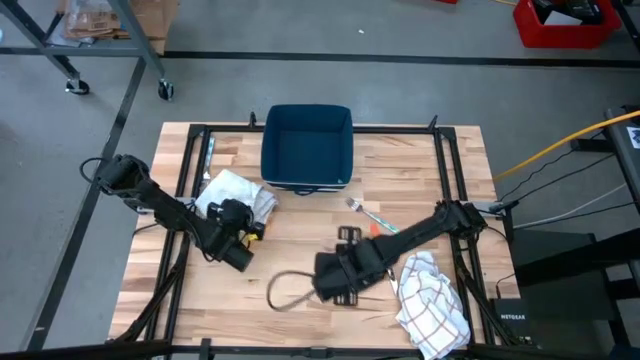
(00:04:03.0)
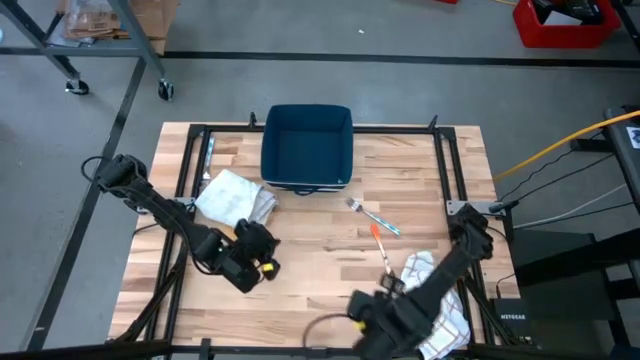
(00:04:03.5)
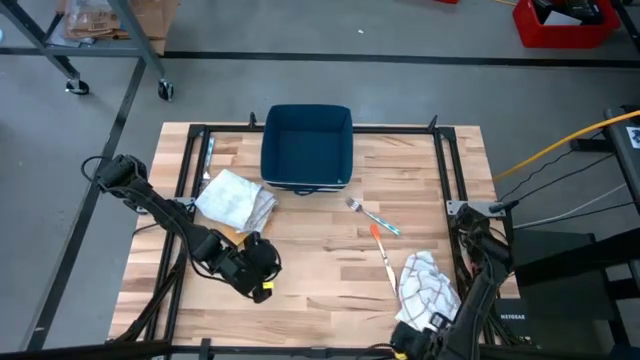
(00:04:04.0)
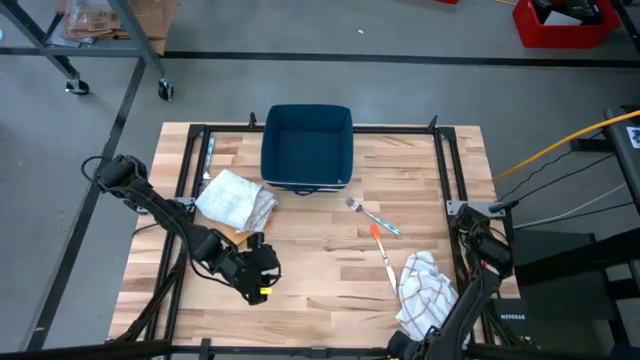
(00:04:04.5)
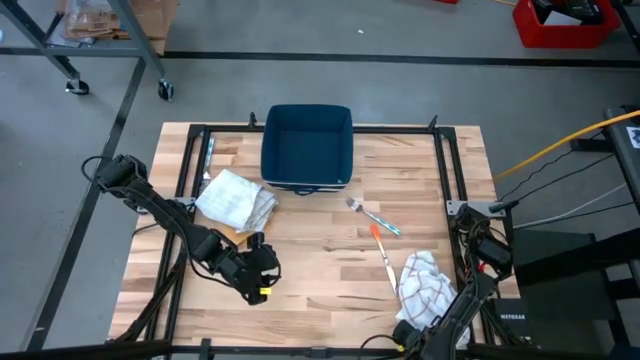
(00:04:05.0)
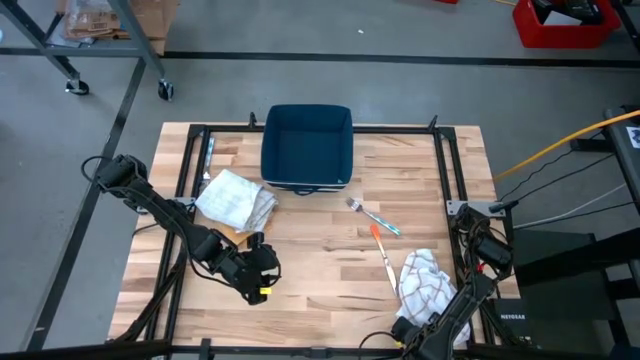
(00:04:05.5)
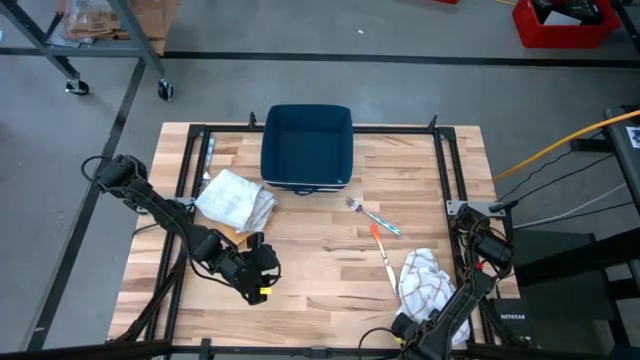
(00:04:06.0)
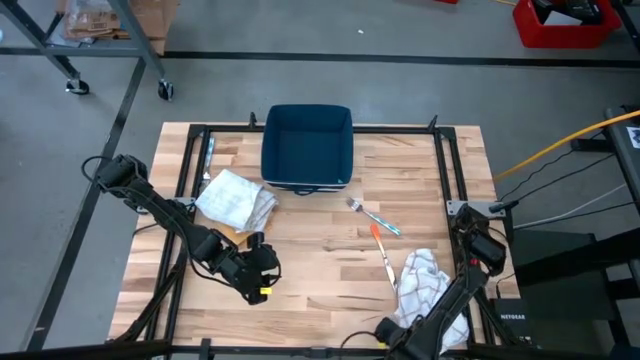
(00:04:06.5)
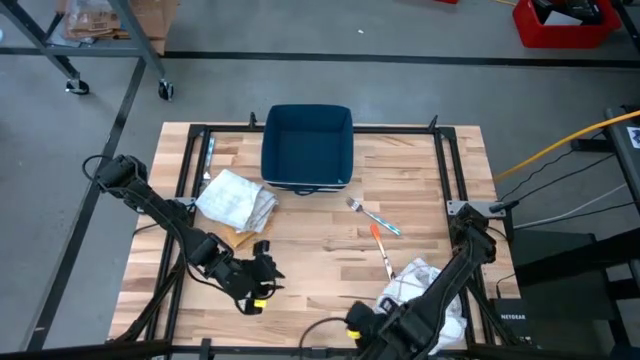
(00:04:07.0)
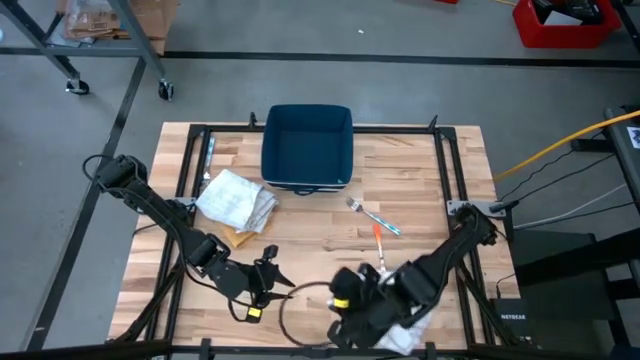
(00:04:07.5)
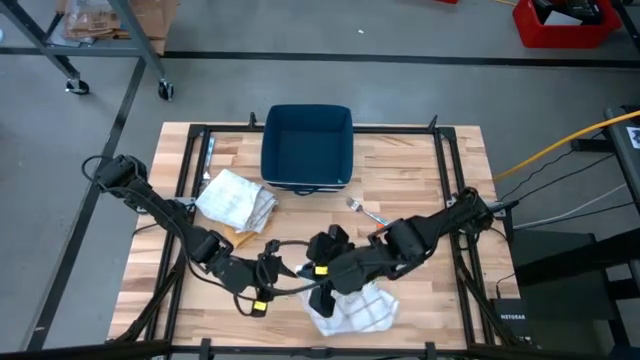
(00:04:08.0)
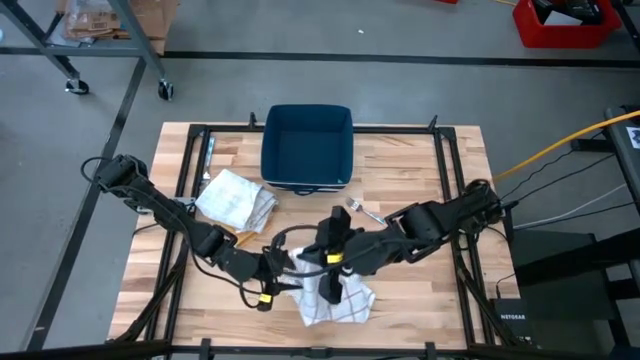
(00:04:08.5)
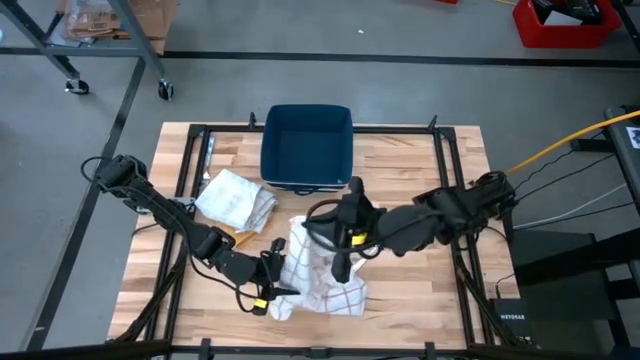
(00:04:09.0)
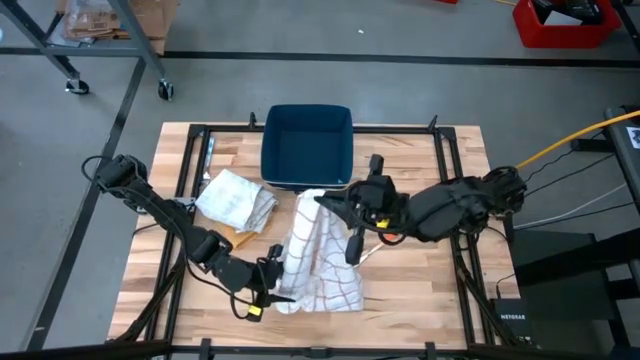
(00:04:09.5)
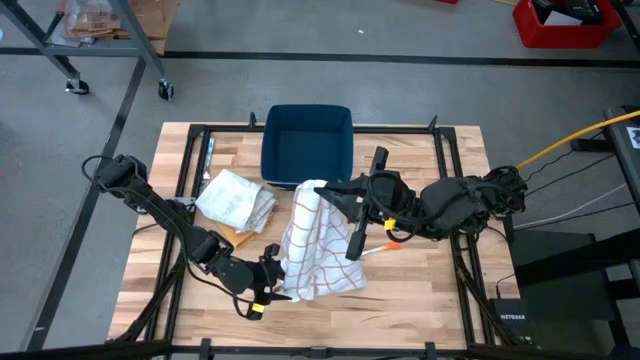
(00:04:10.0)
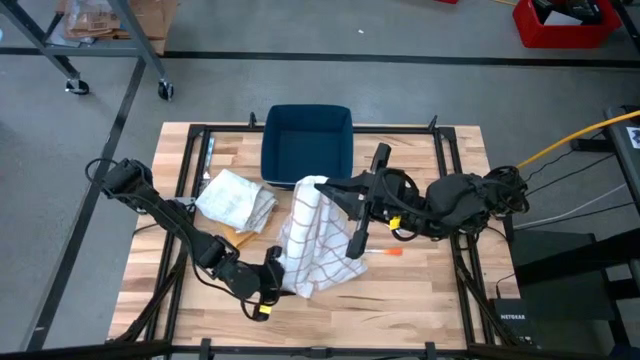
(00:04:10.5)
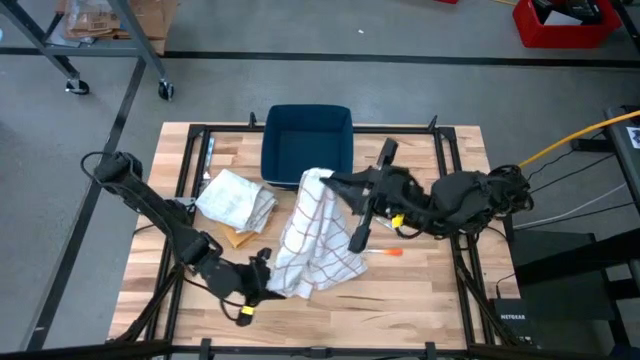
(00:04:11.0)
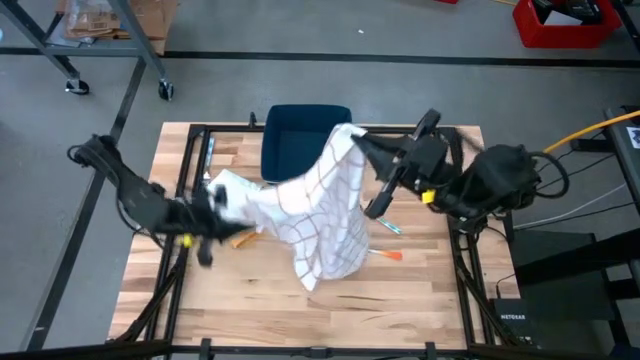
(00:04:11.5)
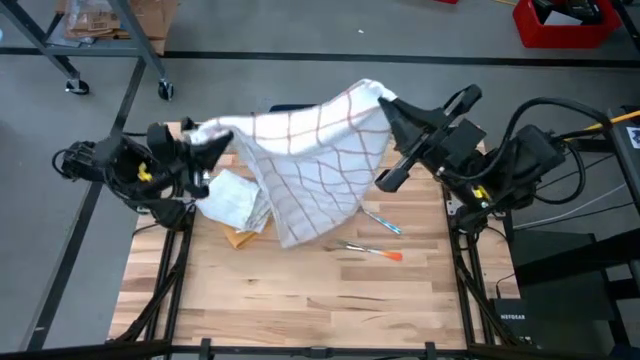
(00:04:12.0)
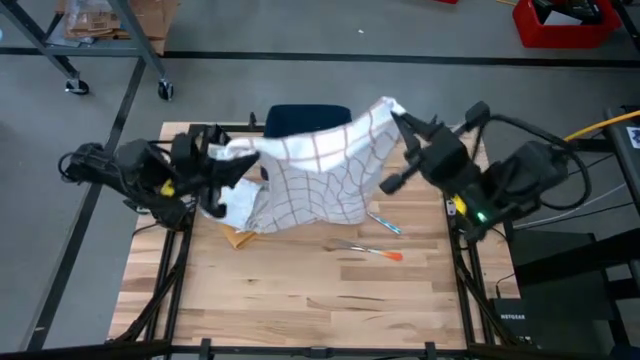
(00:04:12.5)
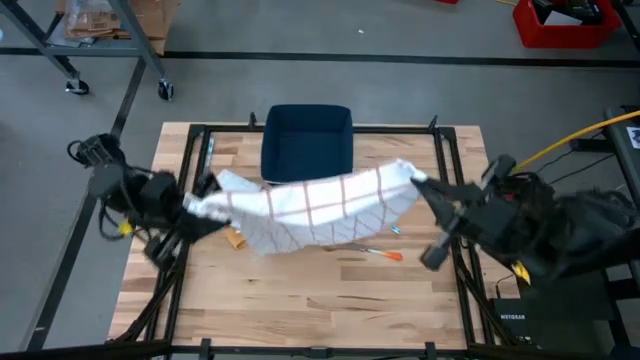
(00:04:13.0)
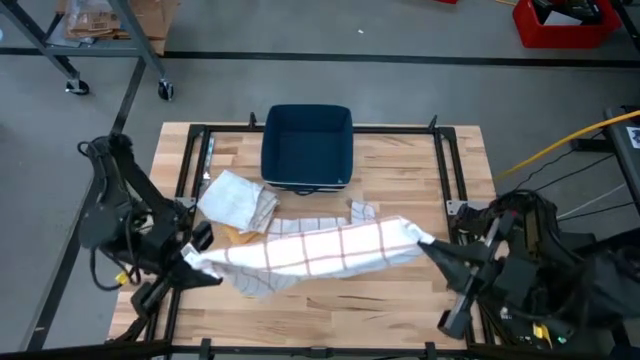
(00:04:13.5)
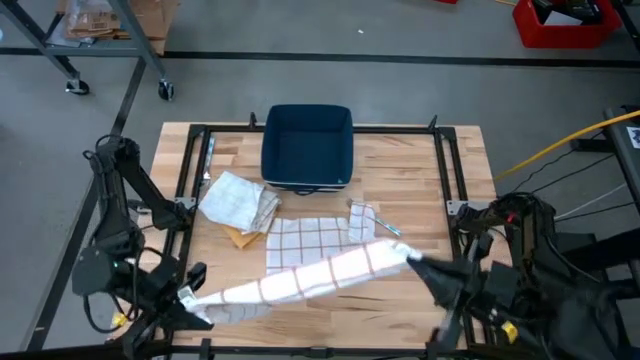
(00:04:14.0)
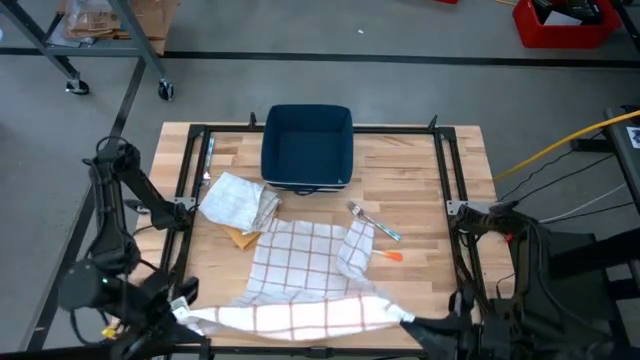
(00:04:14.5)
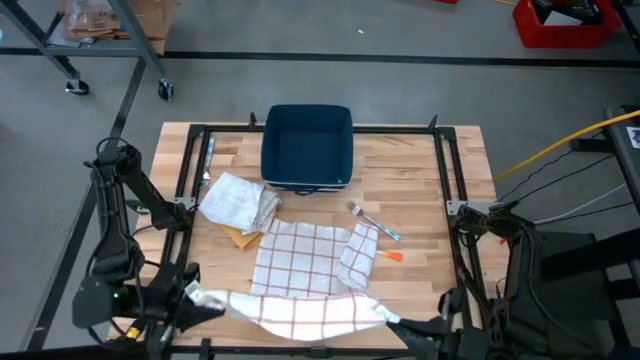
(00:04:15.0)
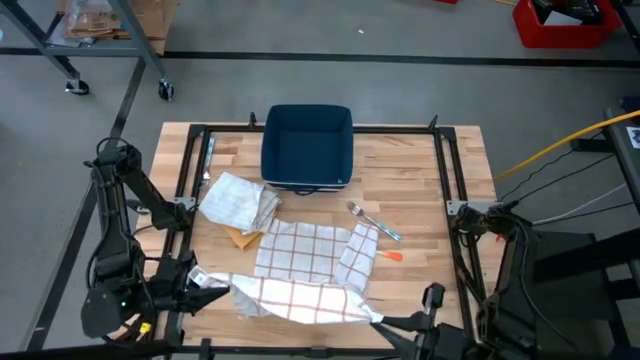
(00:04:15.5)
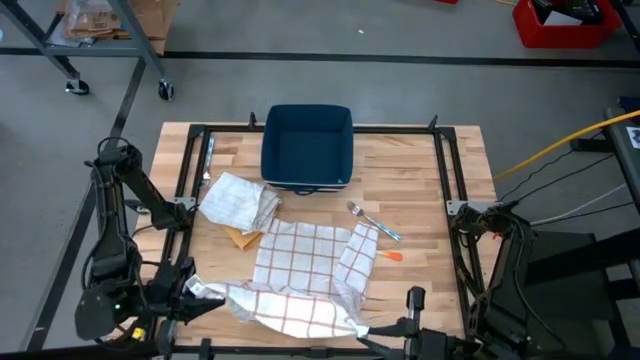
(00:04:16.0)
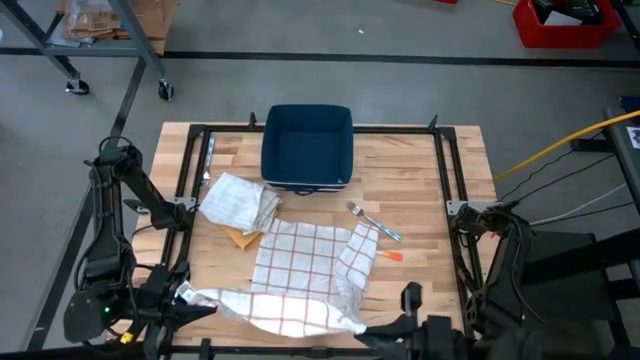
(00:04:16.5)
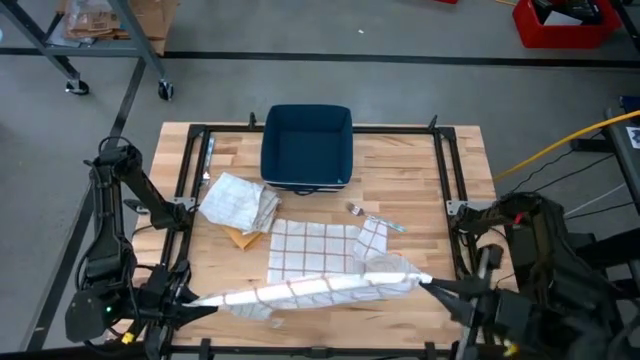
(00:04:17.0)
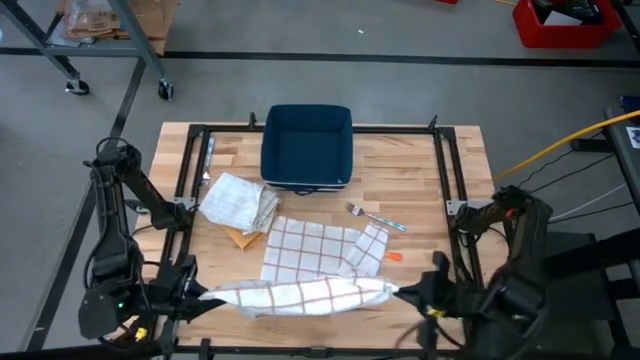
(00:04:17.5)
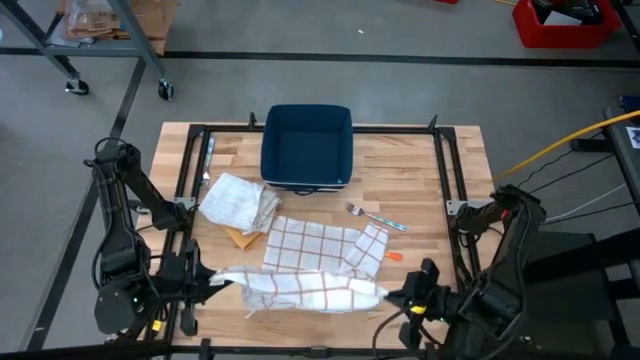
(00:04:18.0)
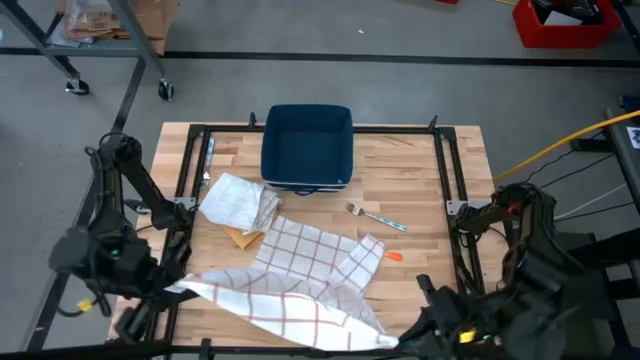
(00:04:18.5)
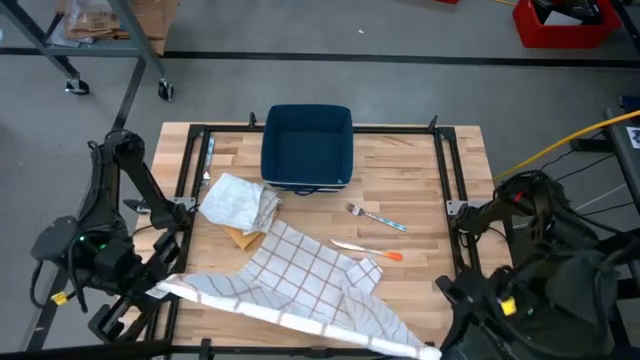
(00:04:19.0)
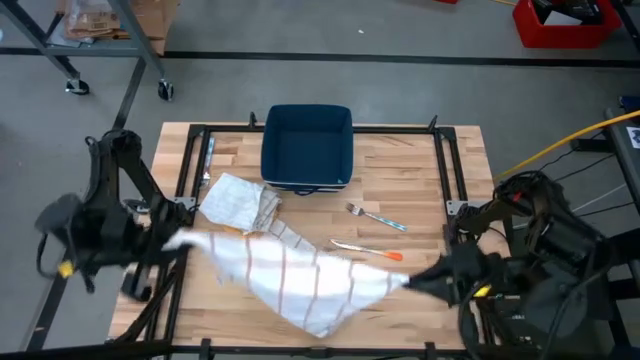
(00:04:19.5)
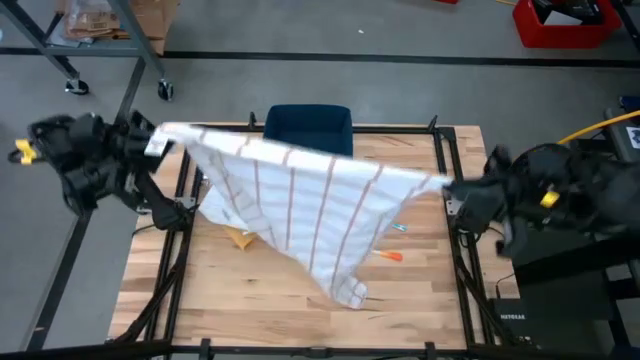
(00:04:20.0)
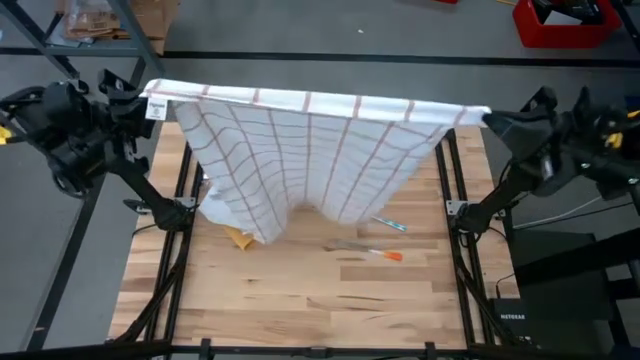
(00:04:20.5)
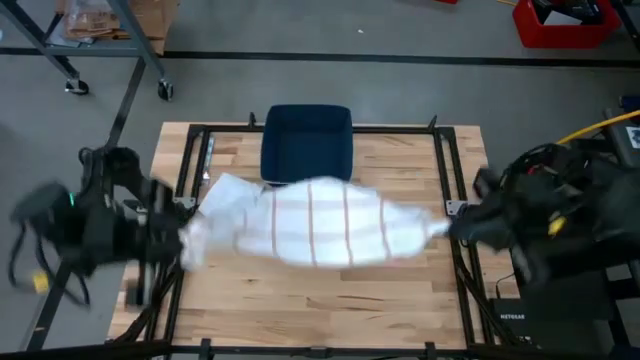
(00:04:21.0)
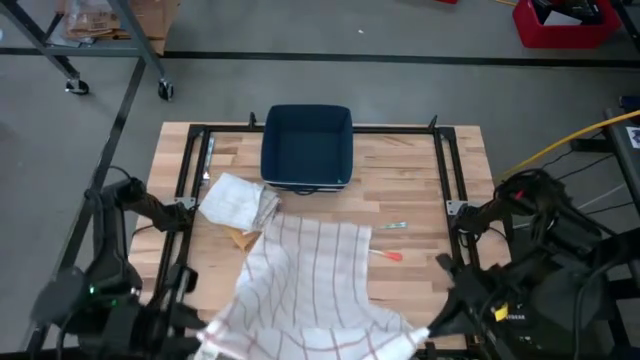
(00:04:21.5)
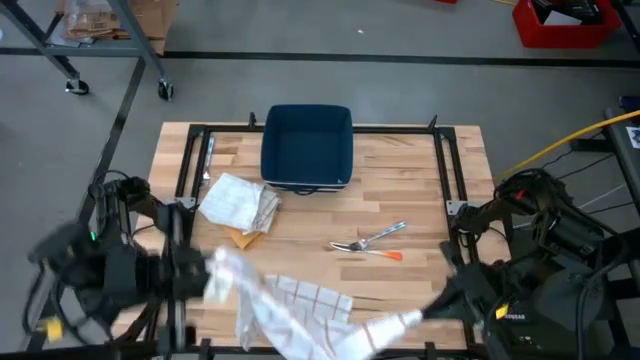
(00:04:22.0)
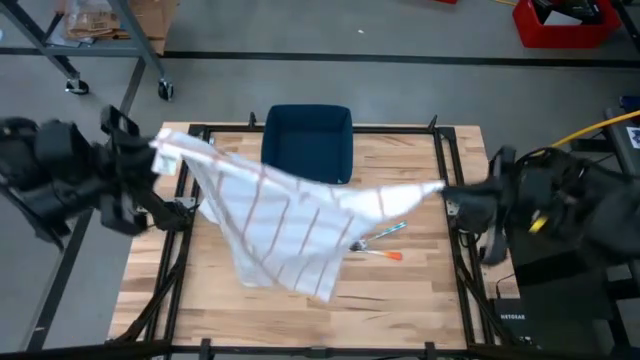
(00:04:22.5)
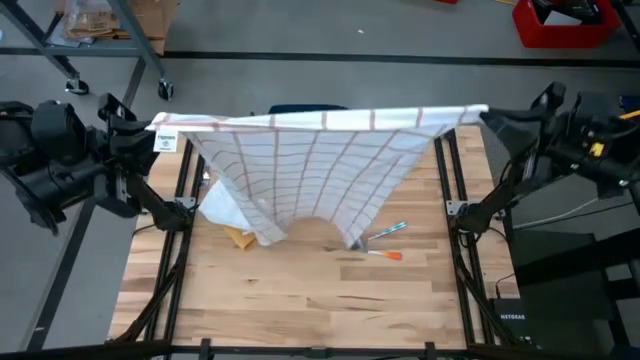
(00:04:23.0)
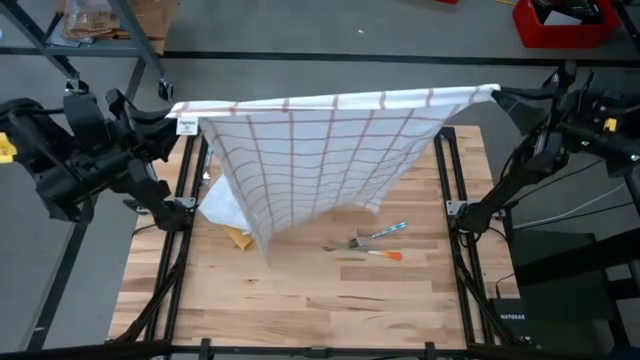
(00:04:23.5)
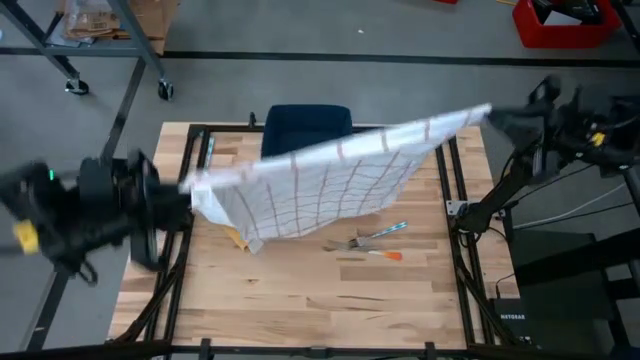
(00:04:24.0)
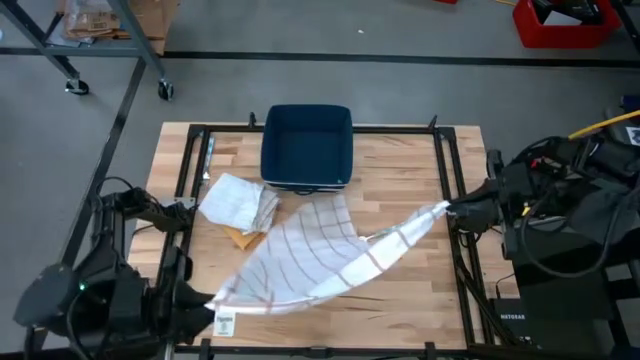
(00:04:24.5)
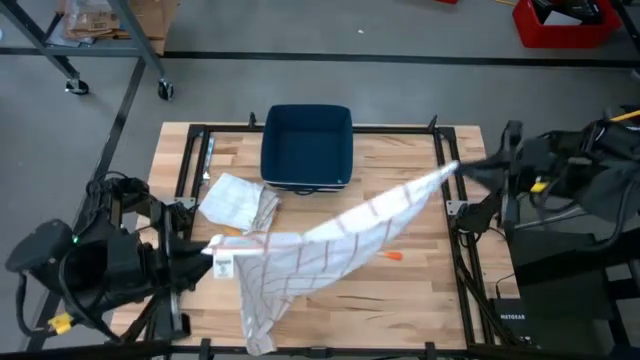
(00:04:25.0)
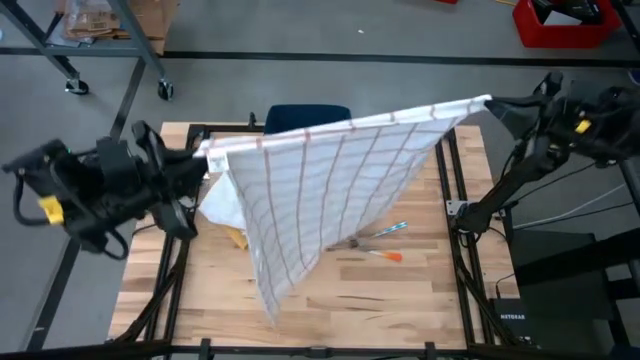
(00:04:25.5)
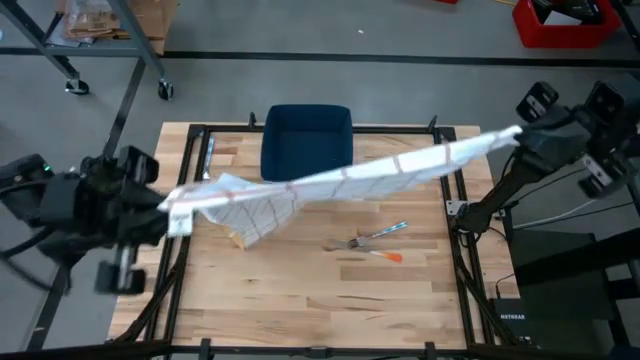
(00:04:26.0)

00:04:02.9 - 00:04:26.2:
Task: Fold towel
Fold the white patterned towel
